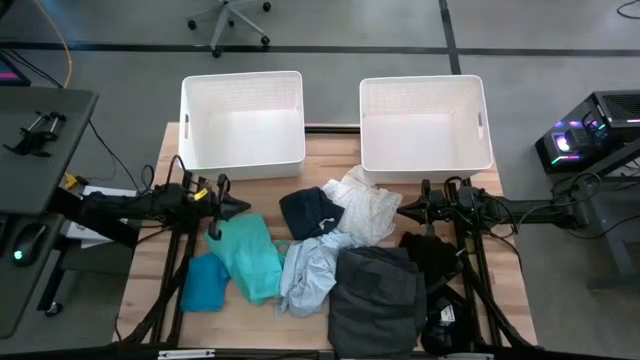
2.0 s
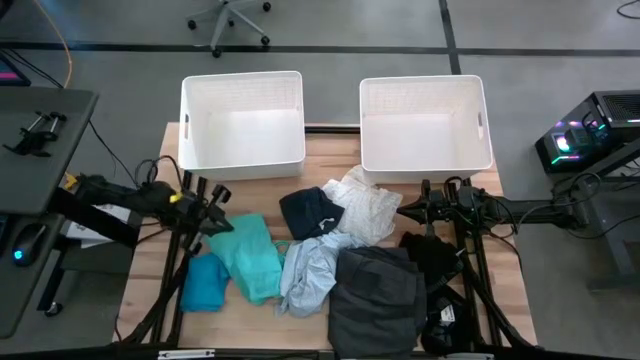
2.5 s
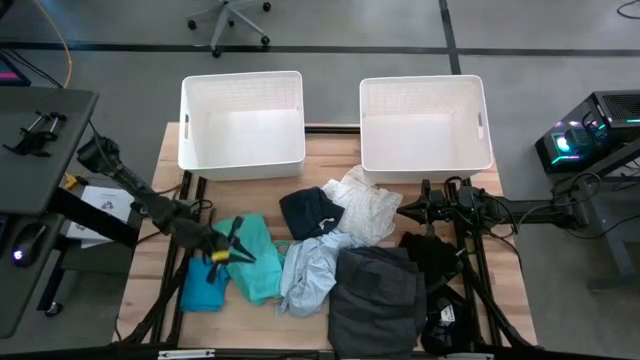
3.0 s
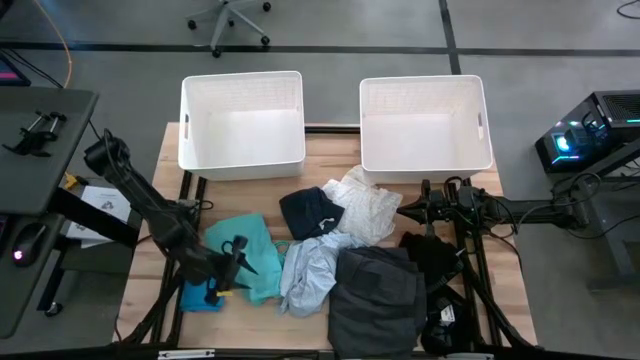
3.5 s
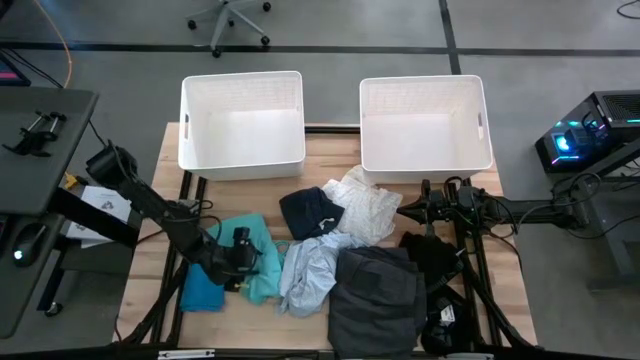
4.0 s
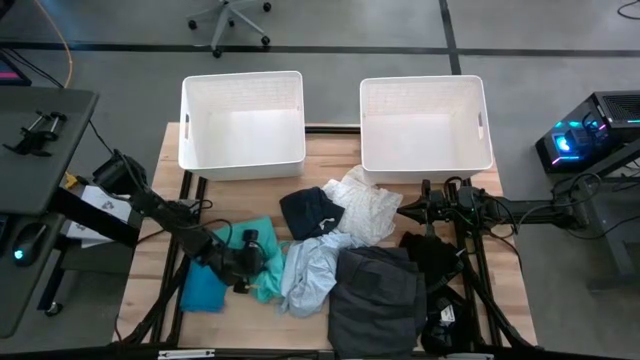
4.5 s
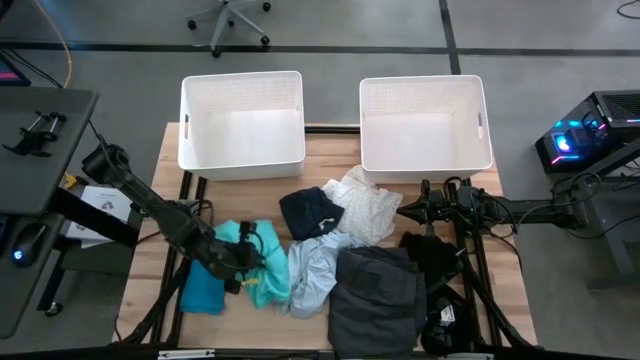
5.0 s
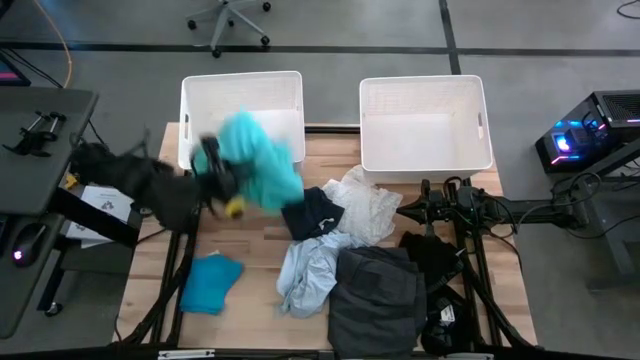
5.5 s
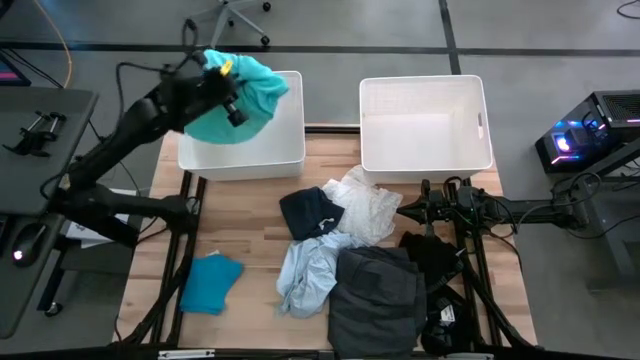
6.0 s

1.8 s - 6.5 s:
Task: Sort clothes
Put the blue shorts into the left white laundry organizer

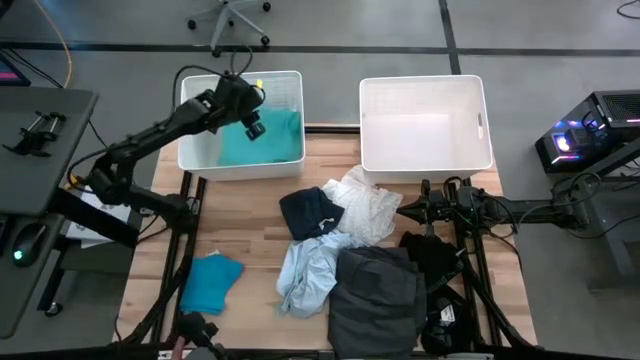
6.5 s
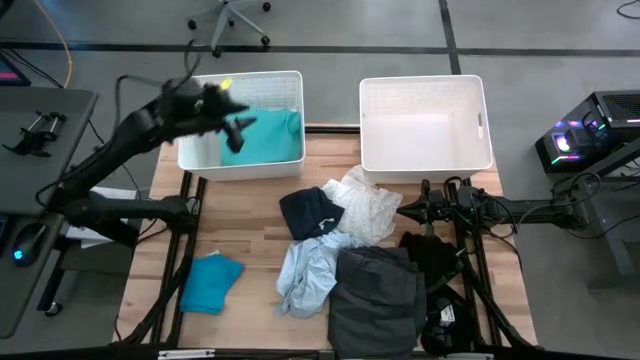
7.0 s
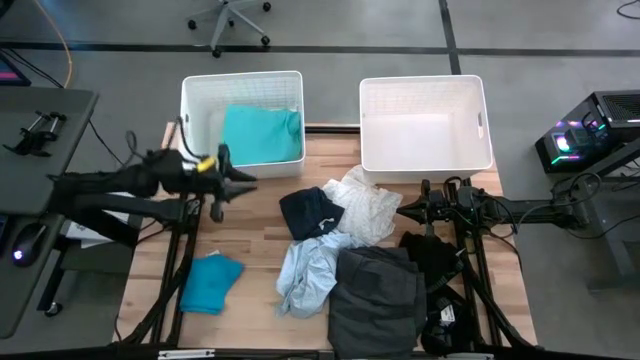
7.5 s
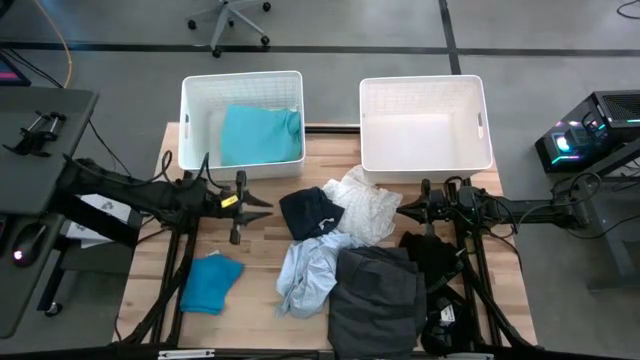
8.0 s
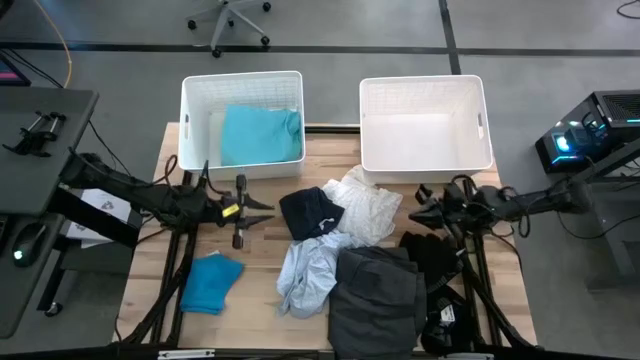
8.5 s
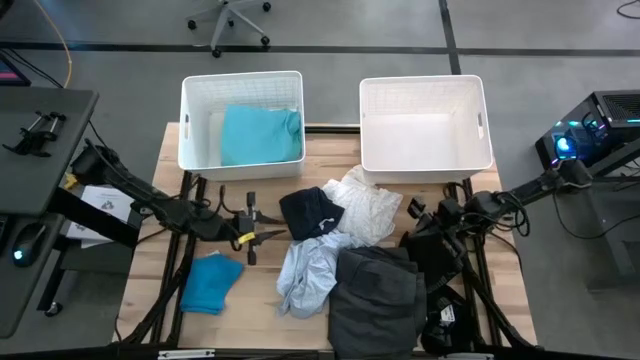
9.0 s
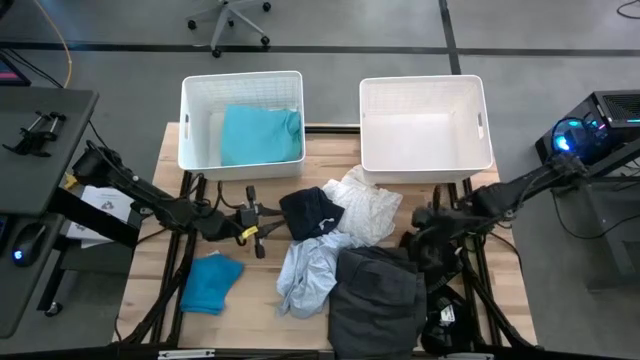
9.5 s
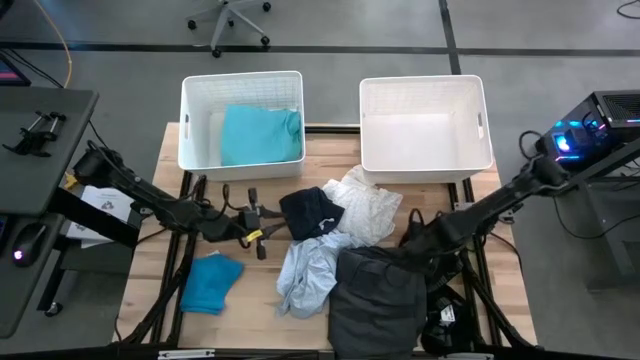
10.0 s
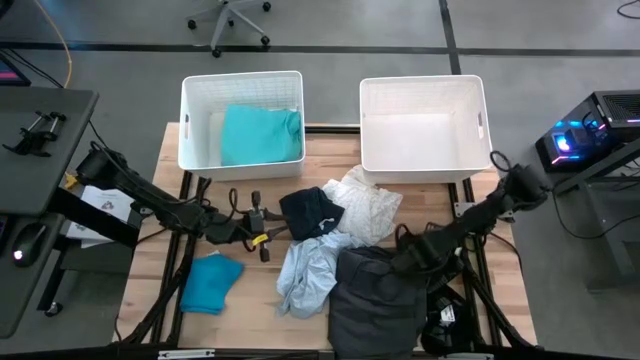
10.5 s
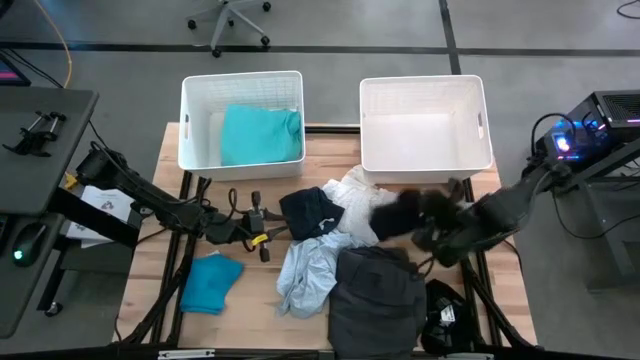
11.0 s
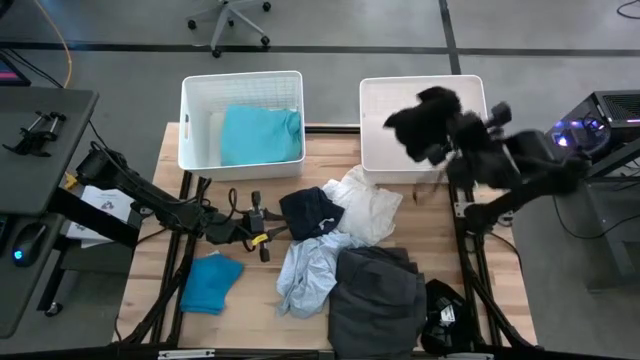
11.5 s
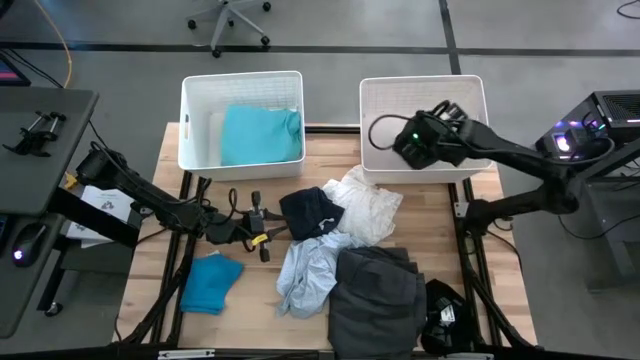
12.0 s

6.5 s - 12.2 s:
Put the top black boxer into the right white laundry organizer

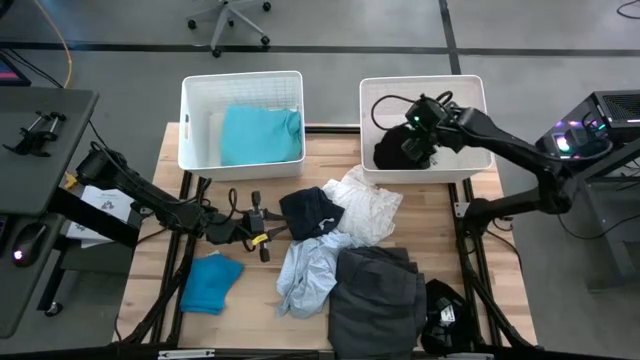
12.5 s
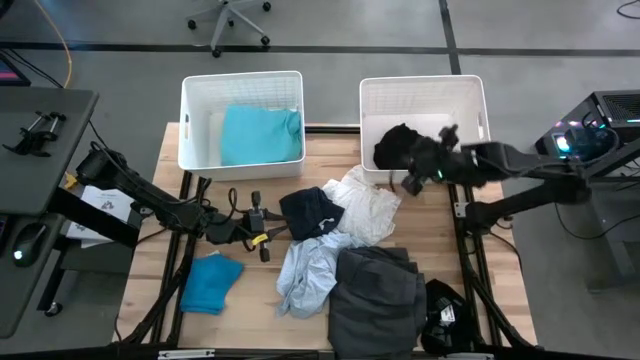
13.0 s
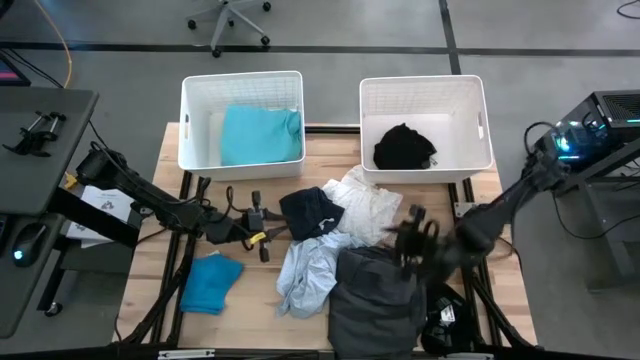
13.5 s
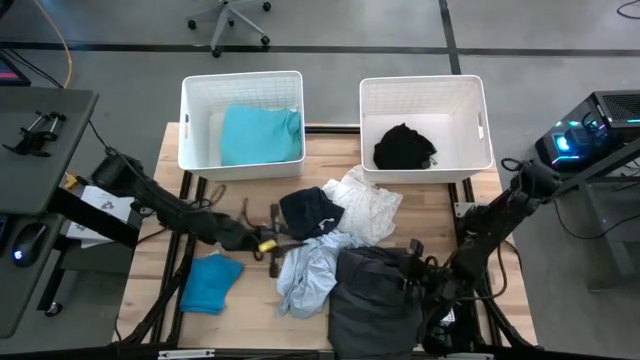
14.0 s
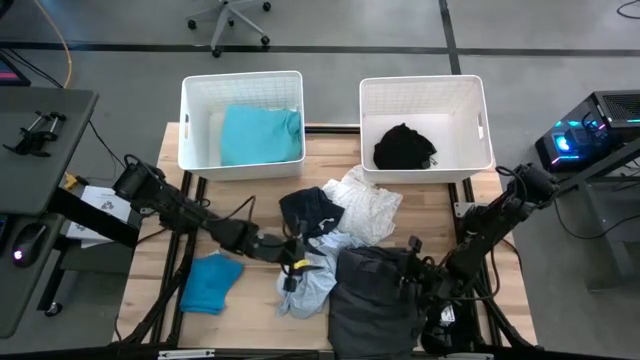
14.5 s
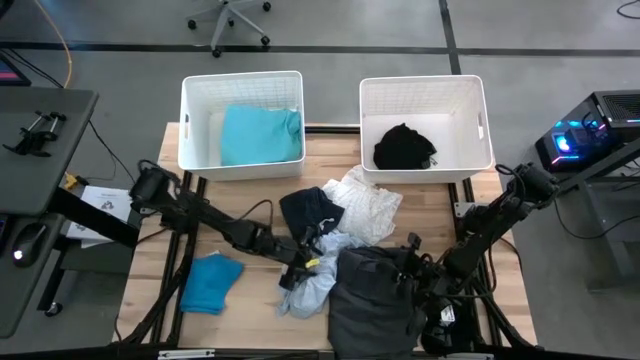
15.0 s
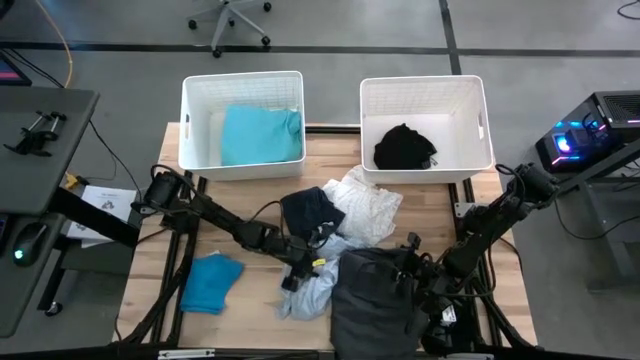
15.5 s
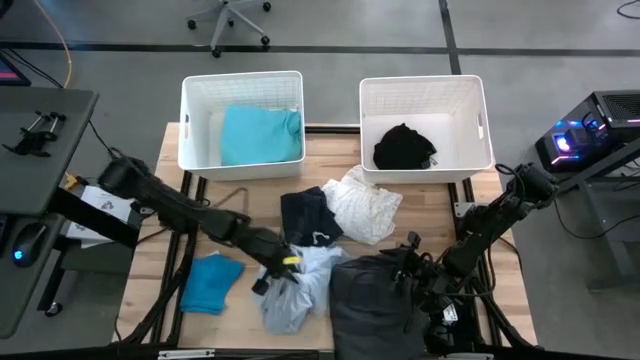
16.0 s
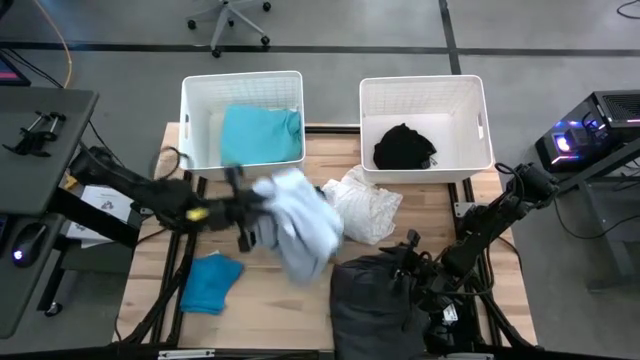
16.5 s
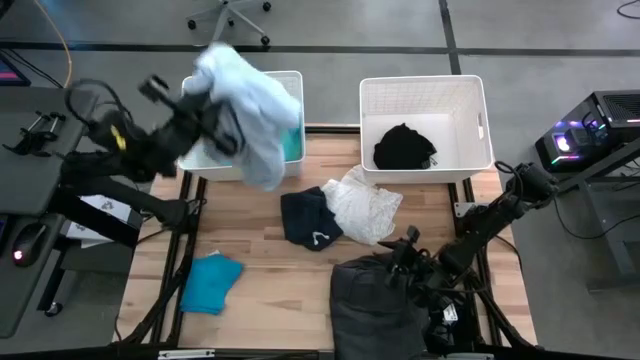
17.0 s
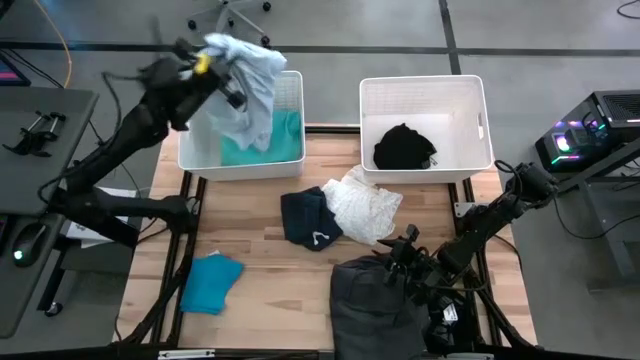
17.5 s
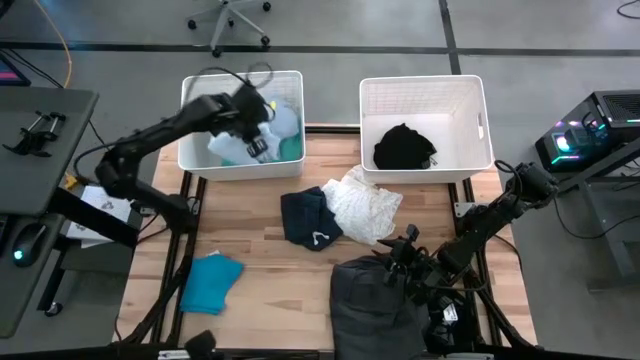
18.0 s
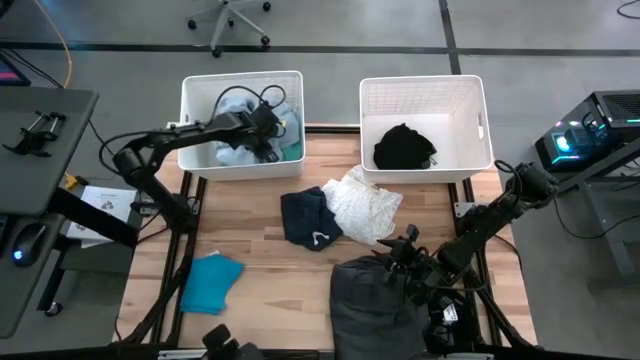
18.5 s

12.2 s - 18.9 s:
Put the blue dress into the left white laundry organizer

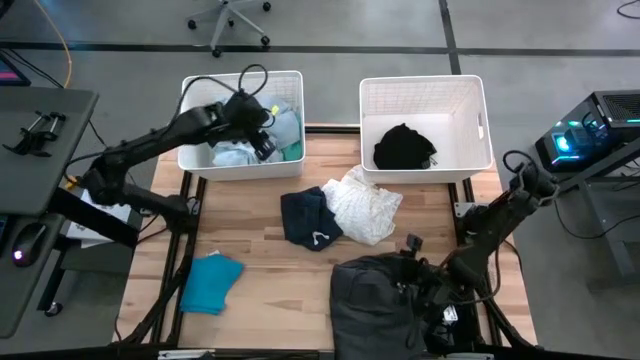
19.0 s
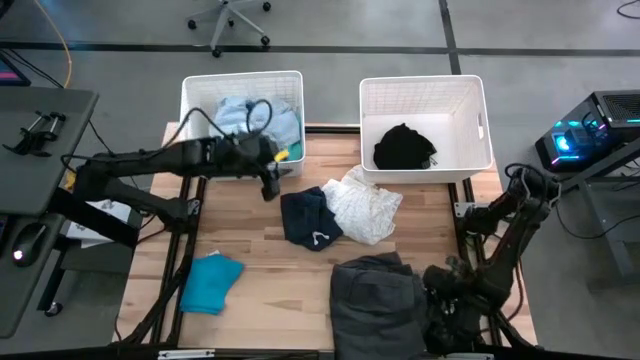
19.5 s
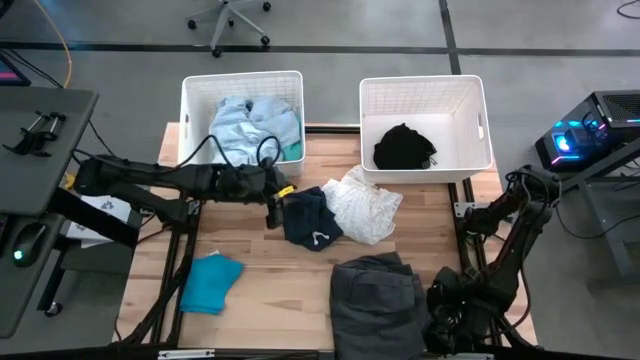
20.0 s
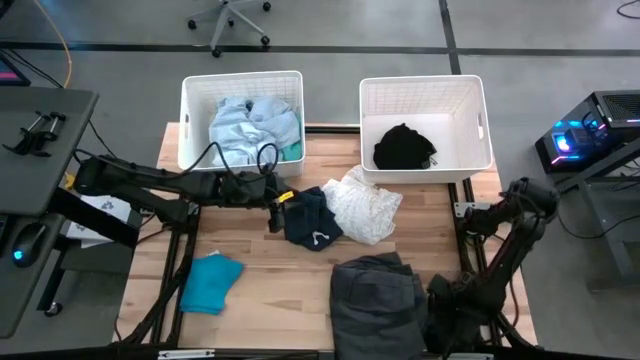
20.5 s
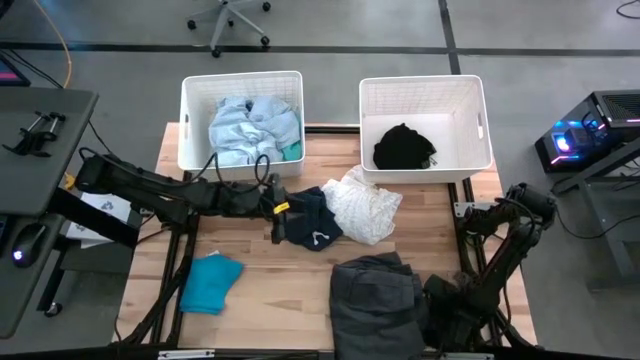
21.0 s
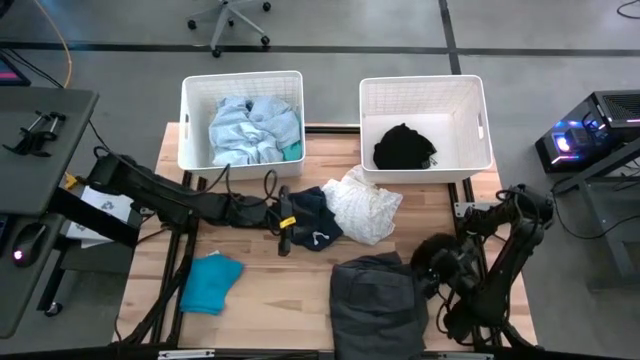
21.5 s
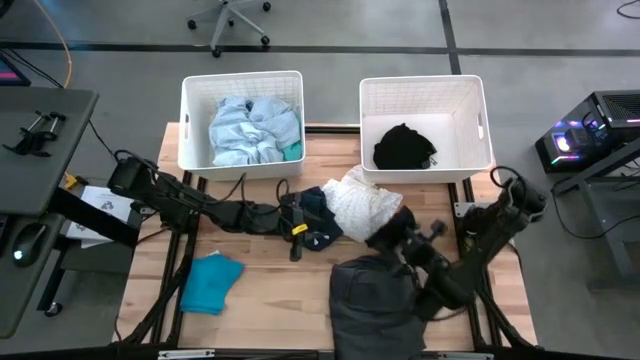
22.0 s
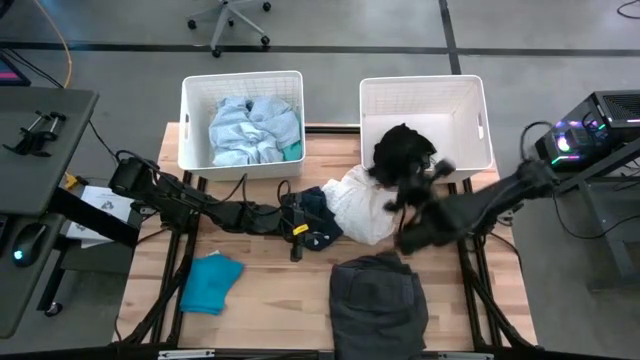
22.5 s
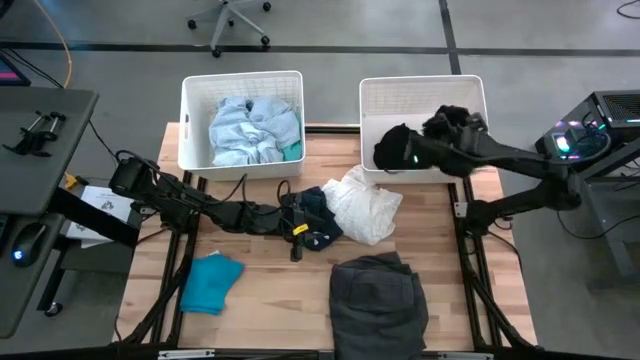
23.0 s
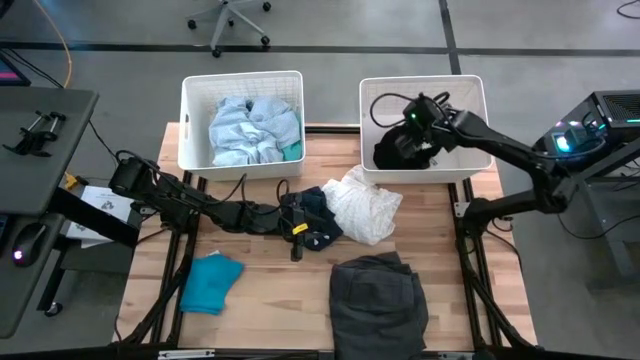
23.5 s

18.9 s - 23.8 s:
Put the black boxer into the right white laundry organizer
